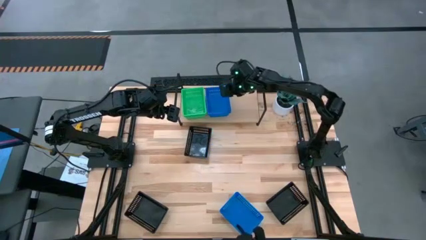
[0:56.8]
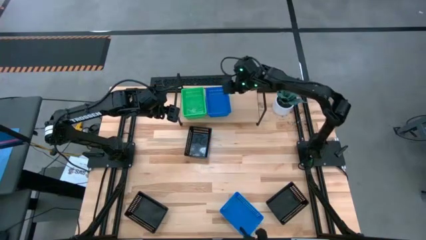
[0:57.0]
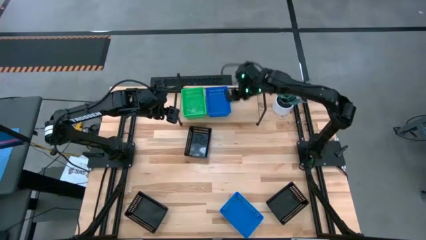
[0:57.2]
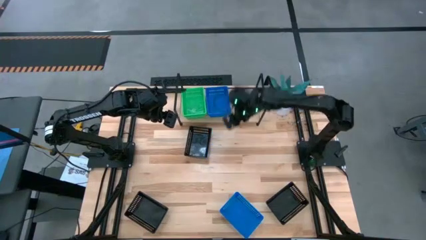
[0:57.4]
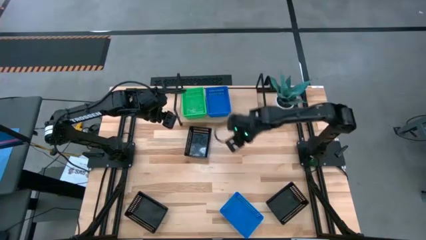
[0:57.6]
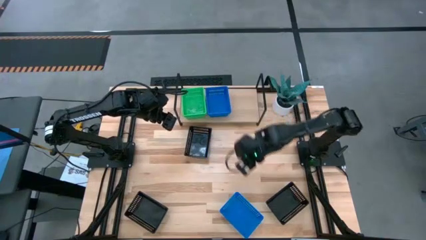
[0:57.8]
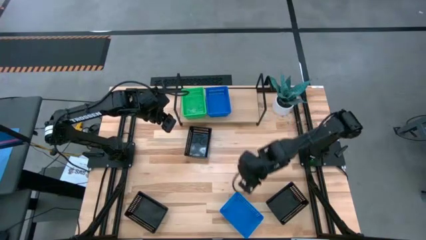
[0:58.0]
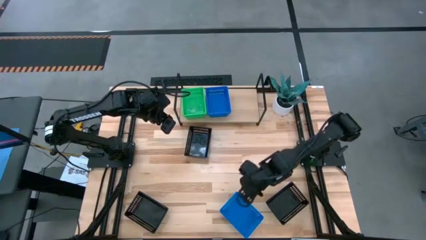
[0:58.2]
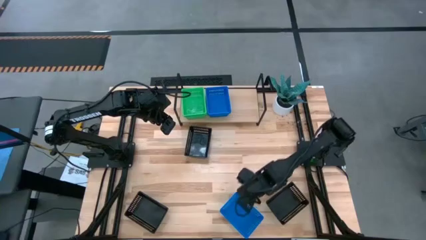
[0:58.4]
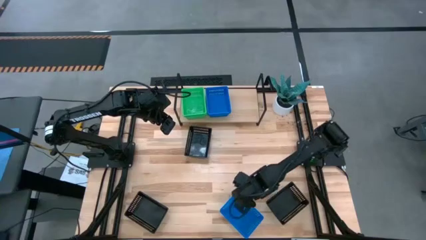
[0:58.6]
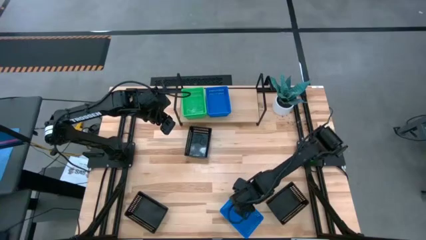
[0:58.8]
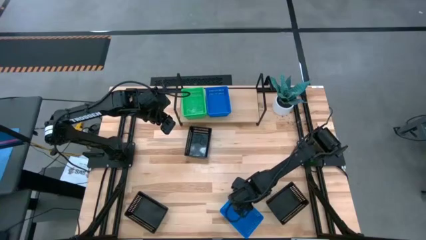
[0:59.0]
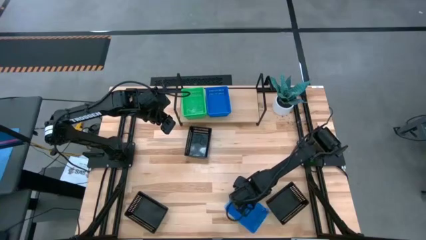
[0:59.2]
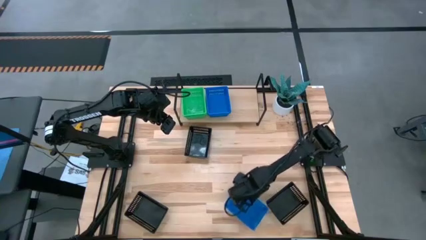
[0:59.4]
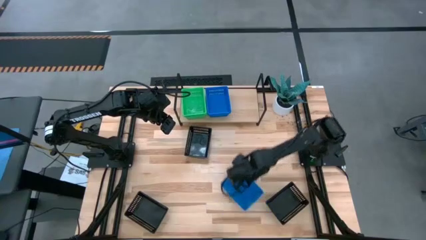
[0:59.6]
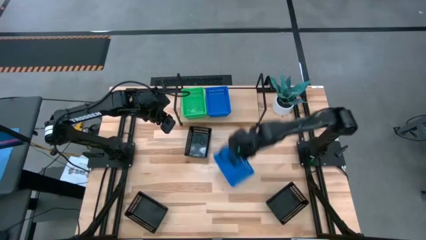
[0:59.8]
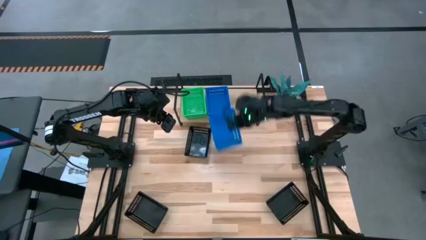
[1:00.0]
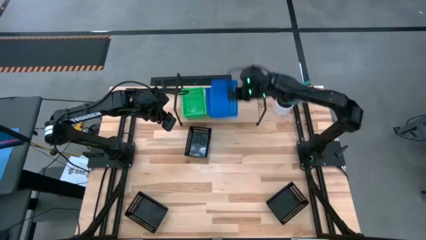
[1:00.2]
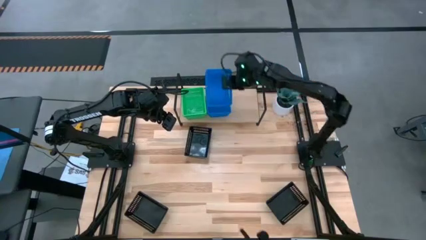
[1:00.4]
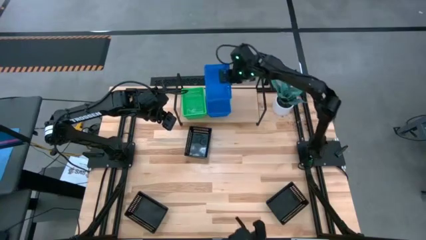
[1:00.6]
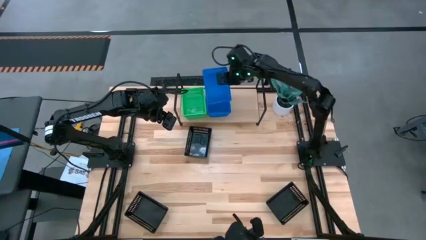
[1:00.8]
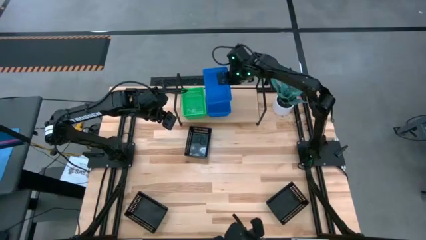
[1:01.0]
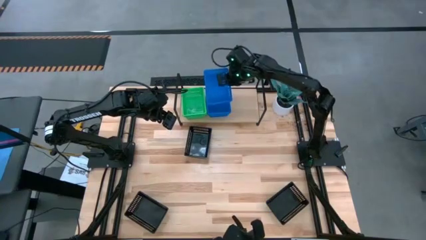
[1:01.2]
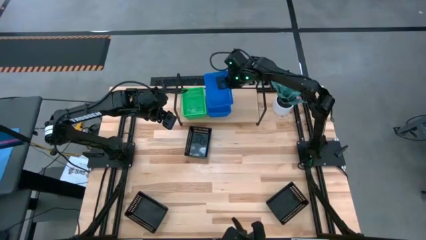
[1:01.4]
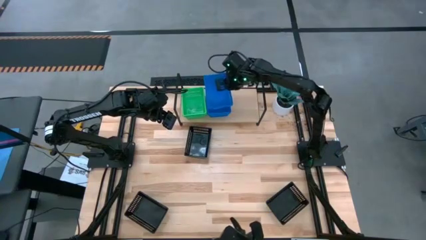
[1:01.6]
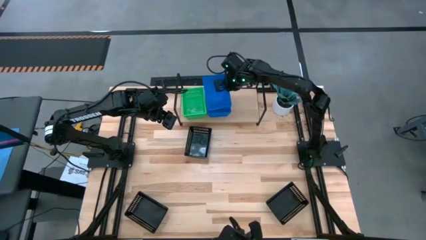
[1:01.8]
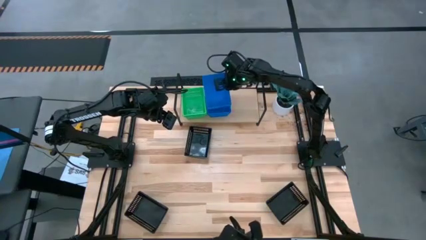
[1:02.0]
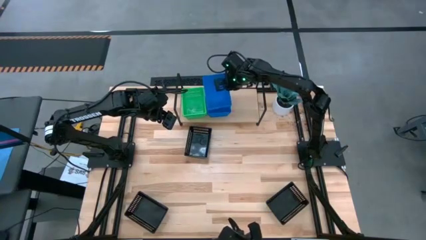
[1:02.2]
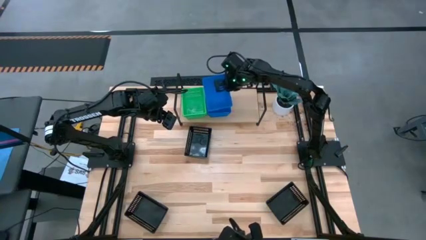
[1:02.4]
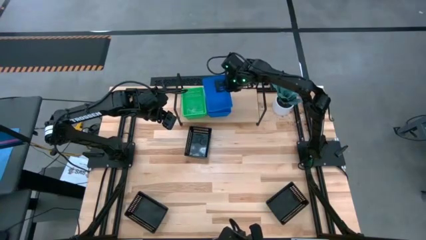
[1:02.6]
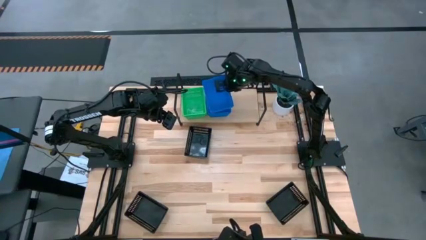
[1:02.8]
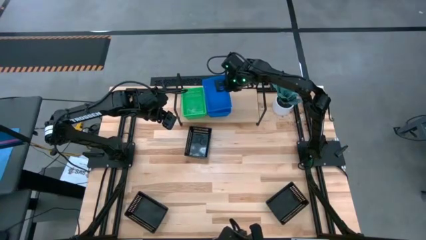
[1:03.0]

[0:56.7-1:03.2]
Task: Stack baskets on shelf by color
Stack the blue bin on the other blue bins on the shelf

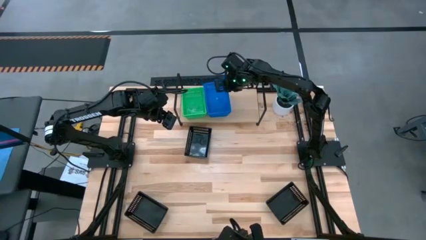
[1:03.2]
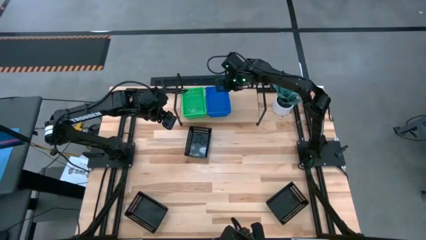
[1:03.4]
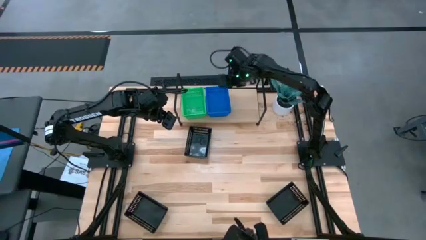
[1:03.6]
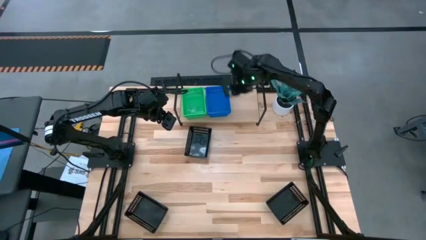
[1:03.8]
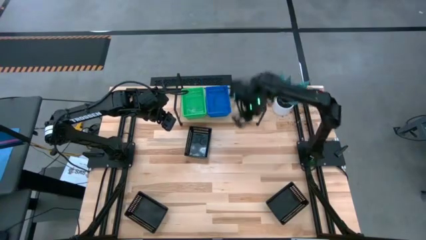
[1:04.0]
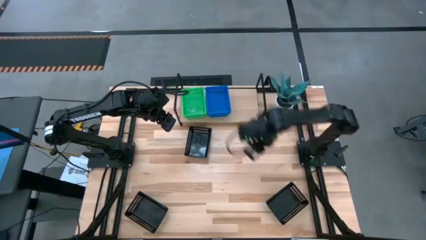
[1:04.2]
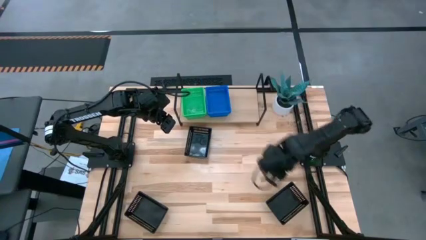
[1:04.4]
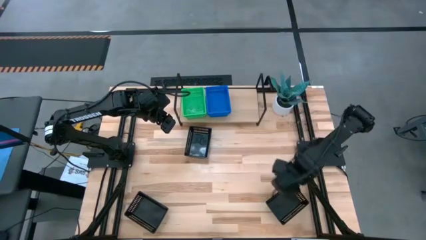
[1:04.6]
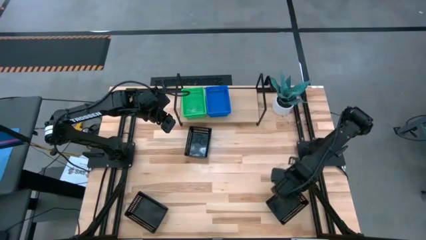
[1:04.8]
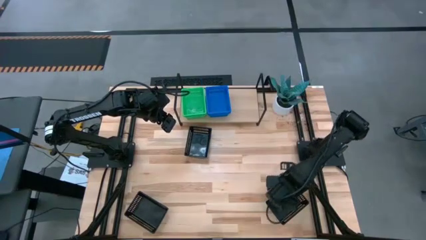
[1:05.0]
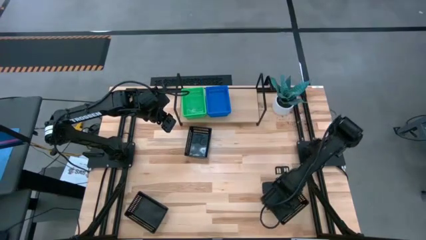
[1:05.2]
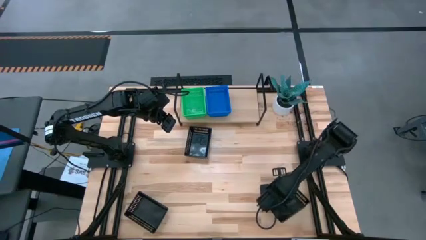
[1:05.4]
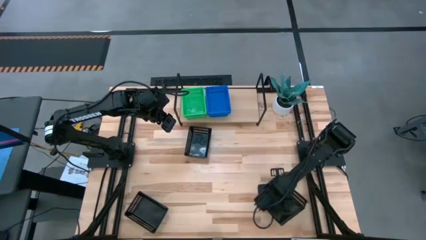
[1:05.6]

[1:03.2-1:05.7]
Put the bottom right black bin on the shelf

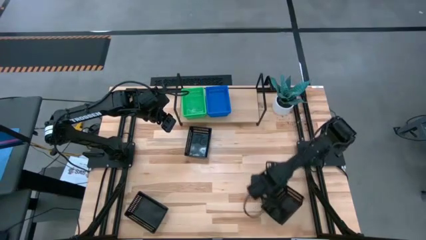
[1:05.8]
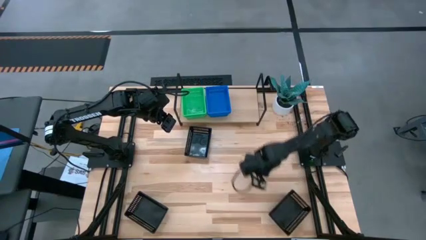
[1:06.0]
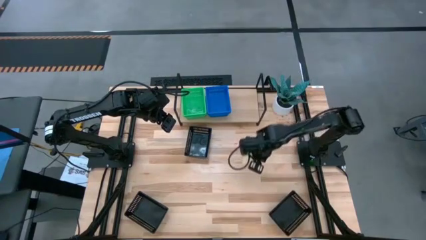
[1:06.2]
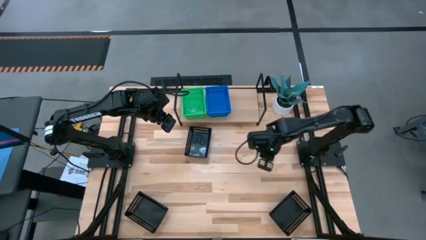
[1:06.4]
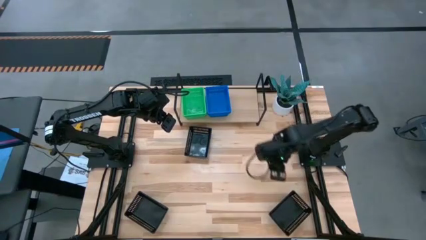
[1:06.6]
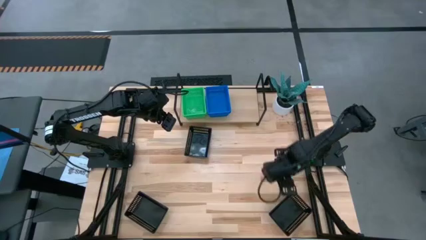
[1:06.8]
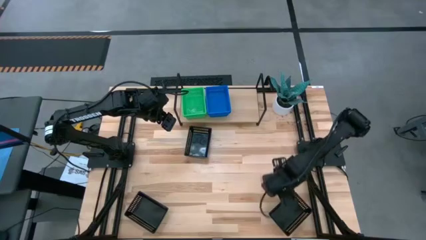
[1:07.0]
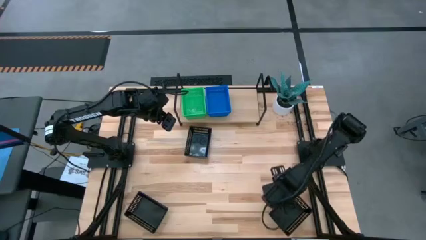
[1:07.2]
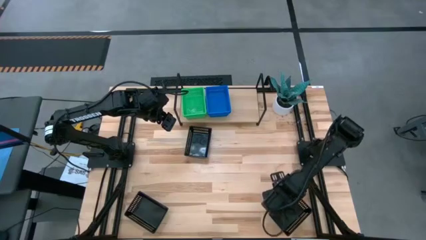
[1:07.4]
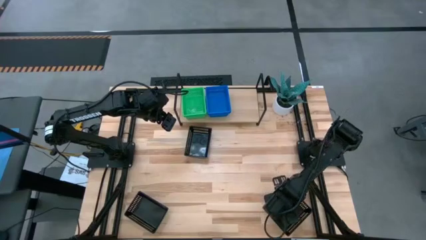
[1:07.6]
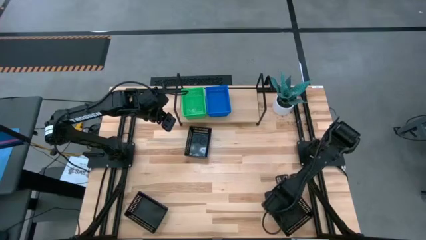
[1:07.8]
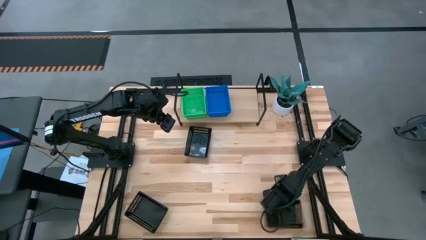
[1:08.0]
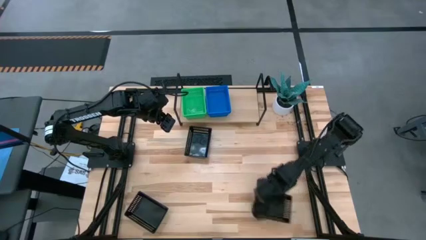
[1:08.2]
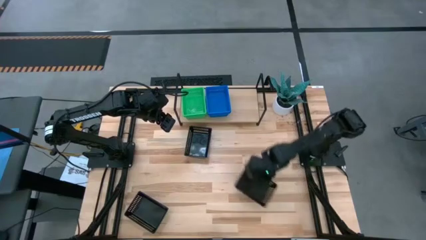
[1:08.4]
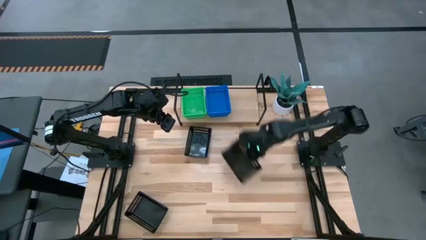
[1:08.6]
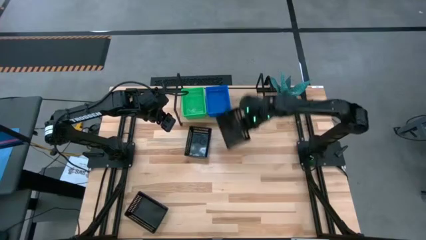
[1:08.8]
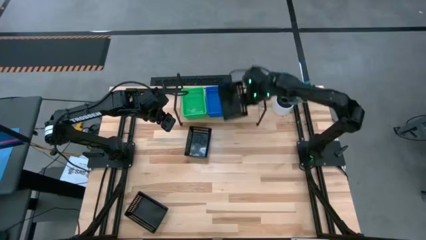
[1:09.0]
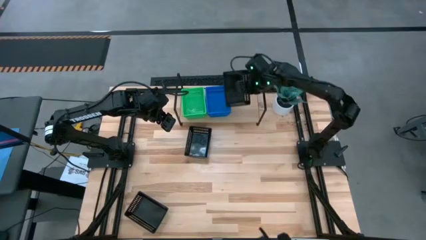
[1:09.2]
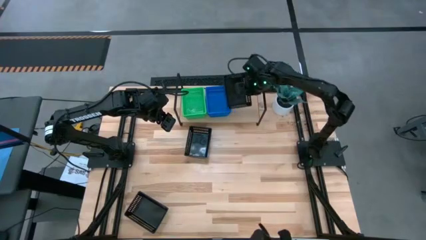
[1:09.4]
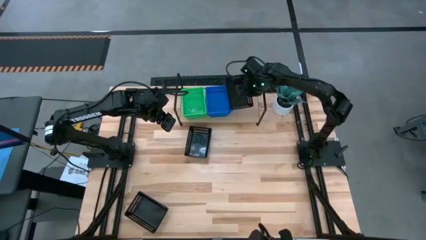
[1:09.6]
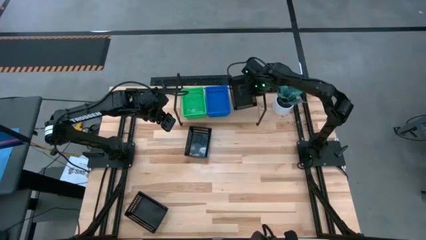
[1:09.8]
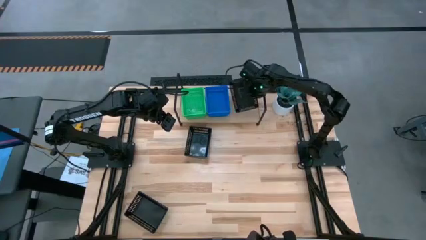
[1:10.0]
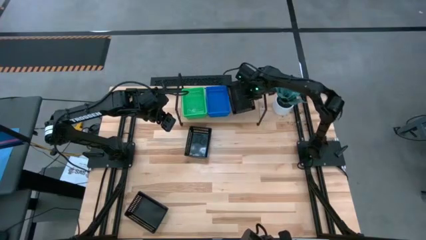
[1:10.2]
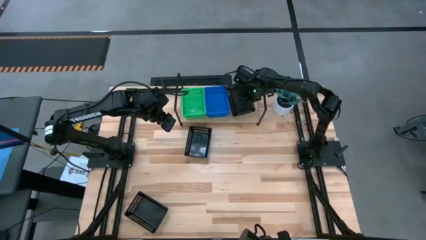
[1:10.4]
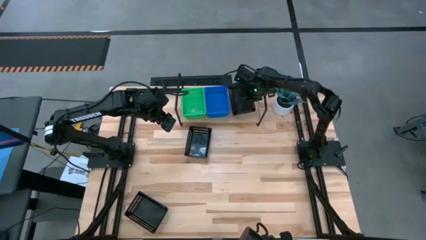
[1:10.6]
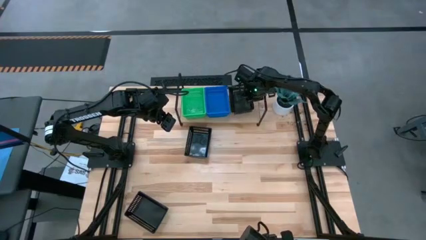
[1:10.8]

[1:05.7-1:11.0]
Put the bottom right black bin on the shelf
